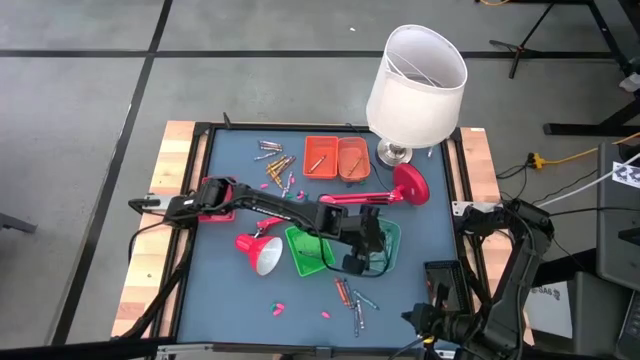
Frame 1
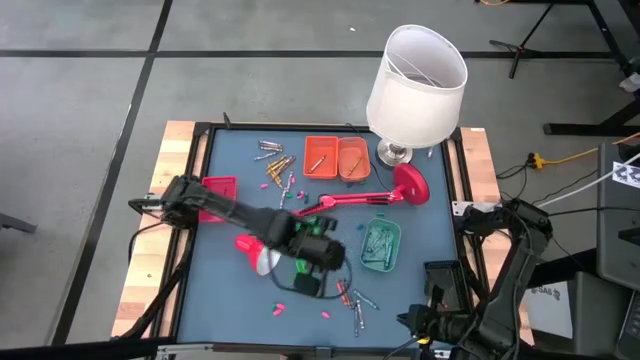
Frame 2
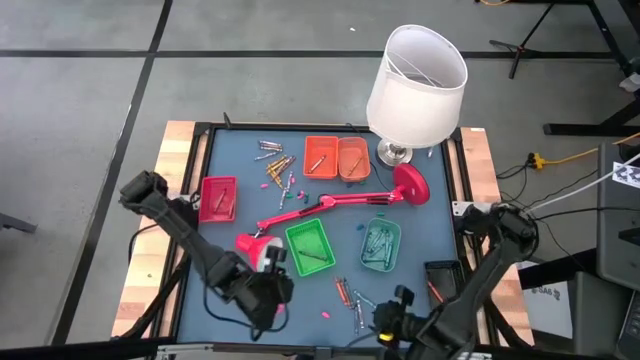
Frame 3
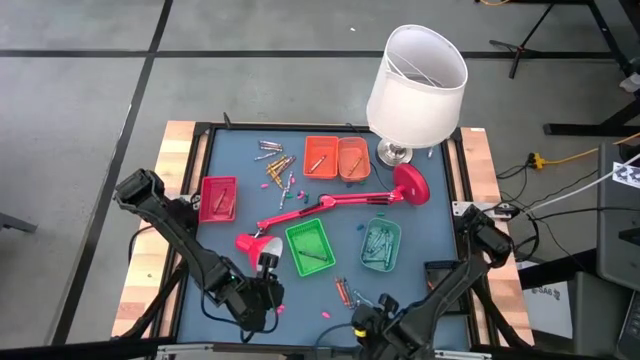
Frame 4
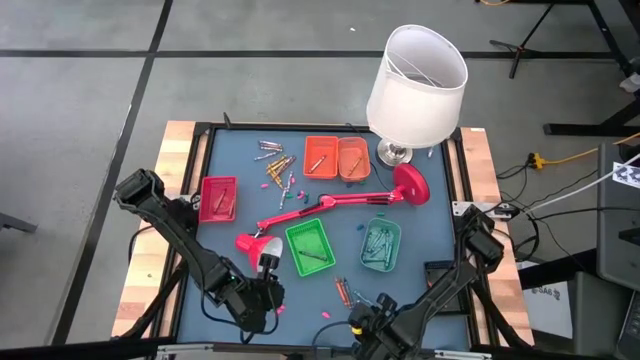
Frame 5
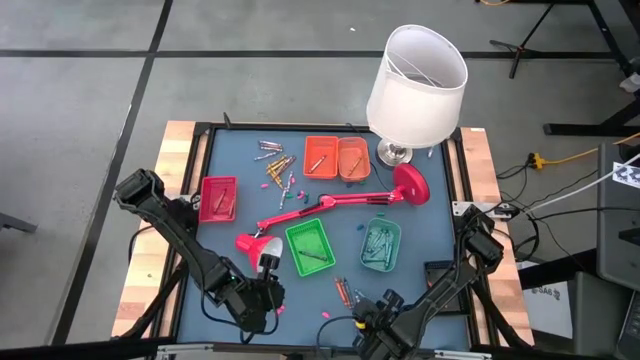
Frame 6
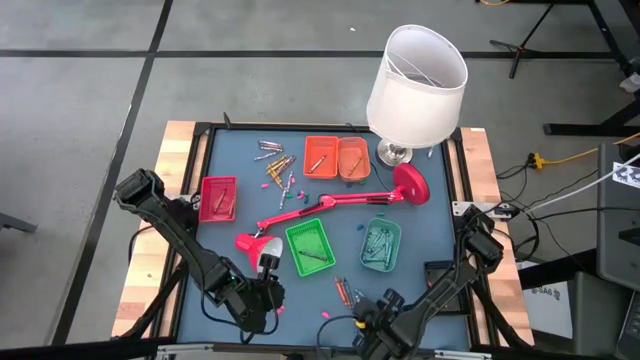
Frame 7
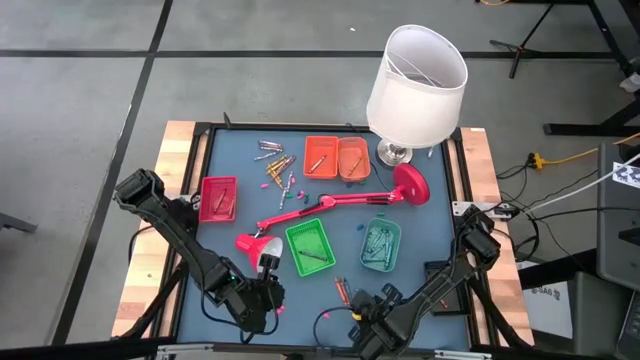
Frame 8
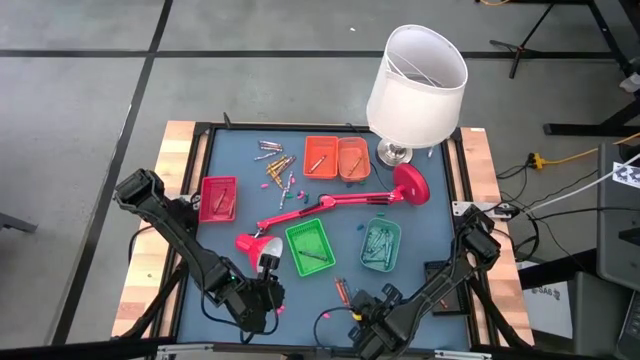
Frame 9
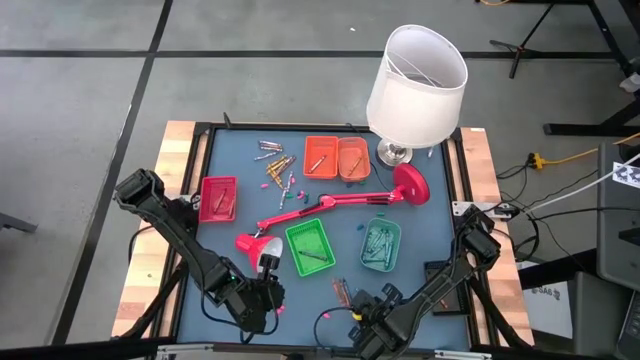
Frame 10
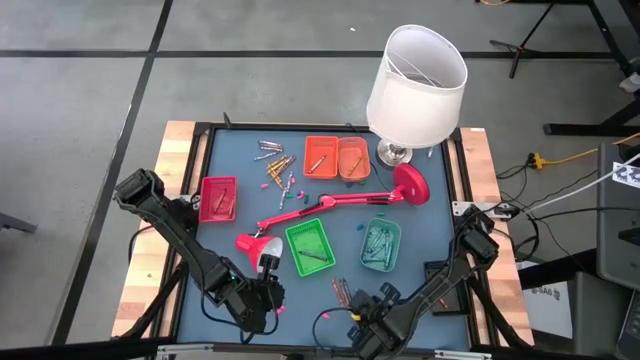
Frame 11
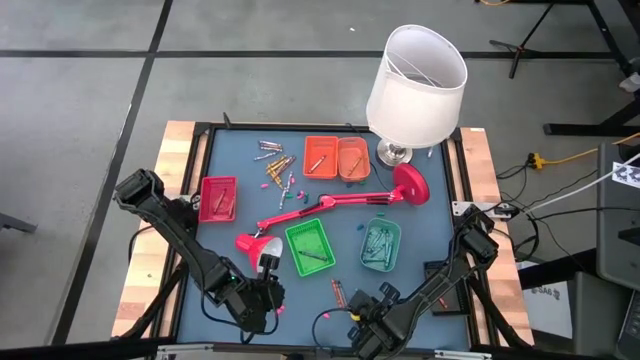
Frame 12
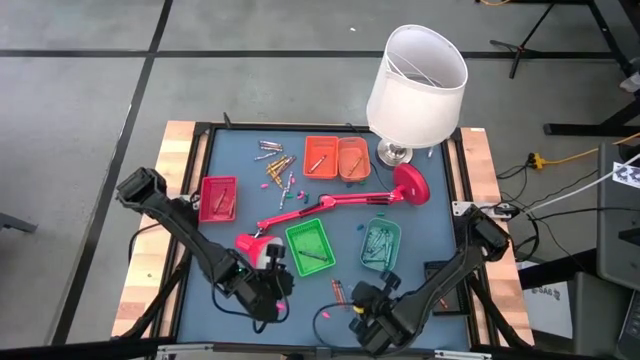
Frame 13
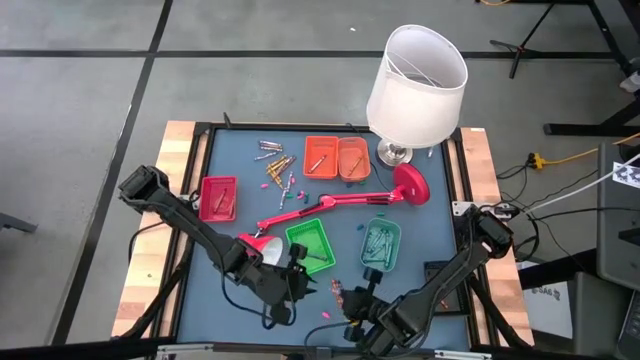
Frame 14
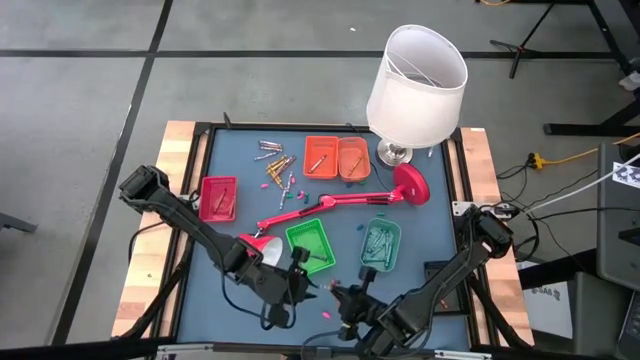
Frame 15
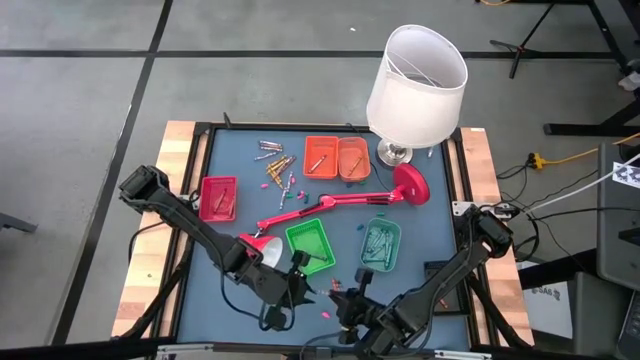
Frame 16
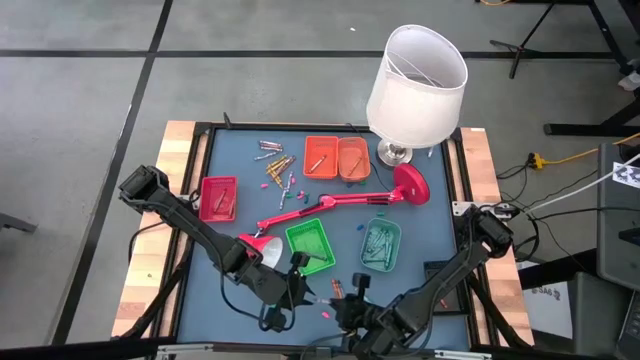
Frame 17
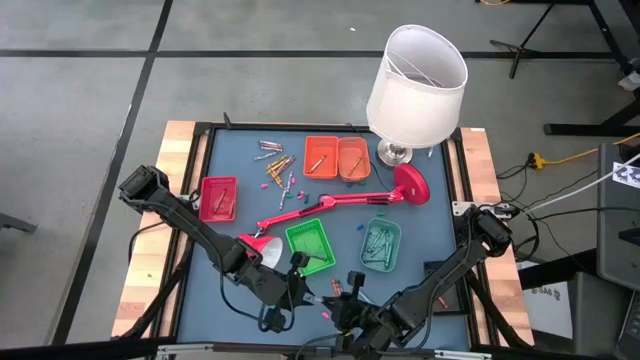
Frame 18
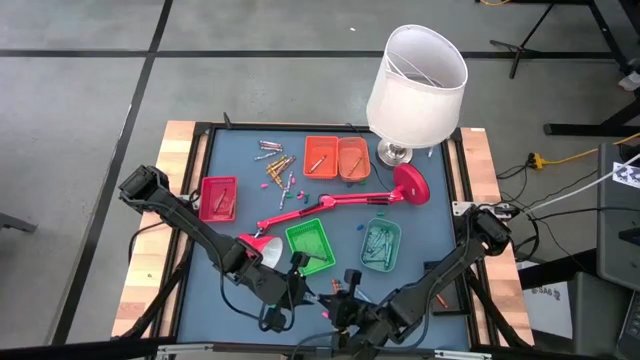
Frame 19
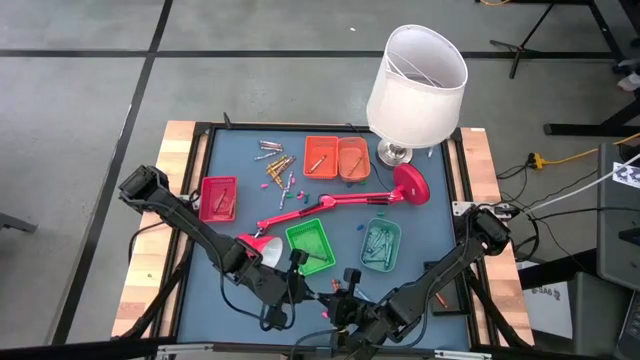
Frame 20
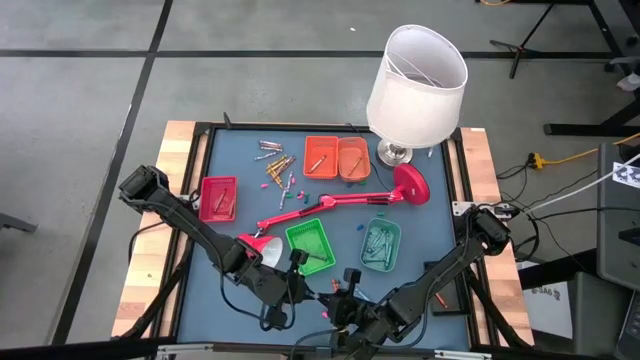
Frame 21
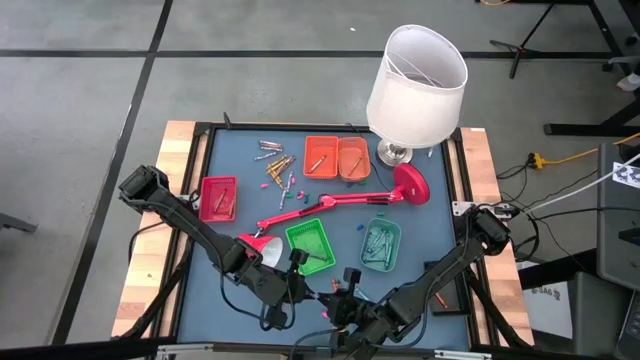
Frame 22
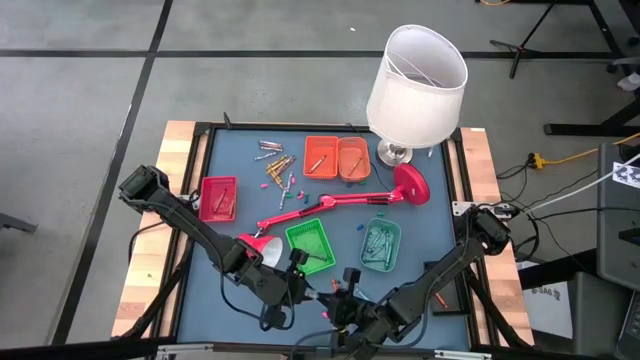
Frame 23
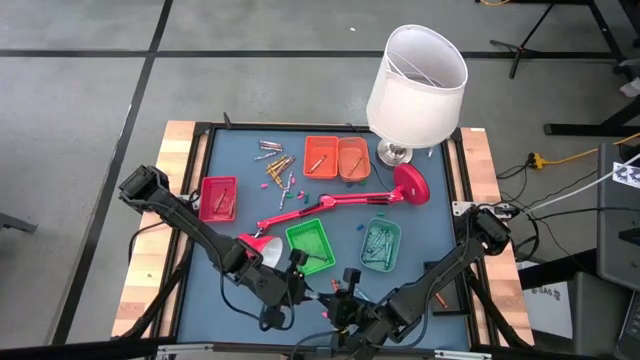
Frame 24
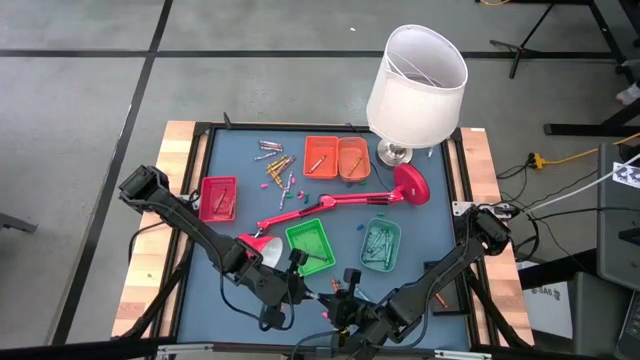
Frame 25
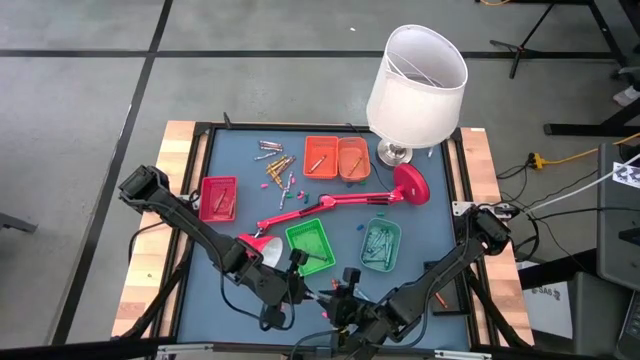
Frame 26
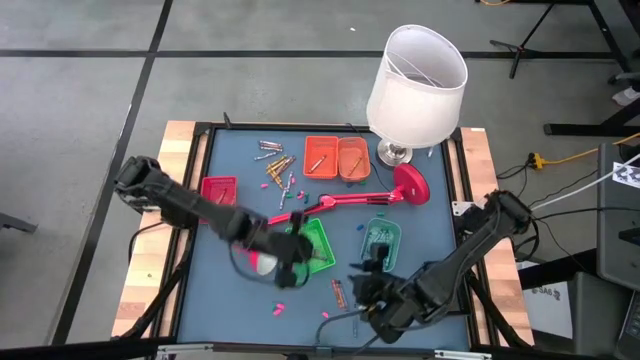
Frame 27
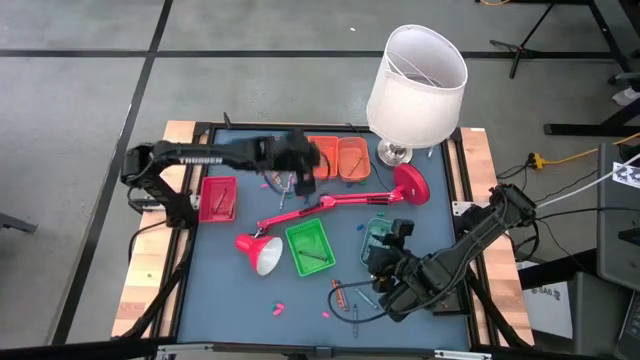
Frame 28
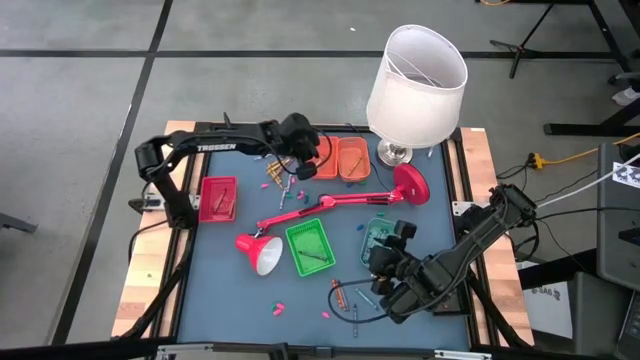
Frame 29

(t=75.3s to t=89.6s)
Task: Sort crayons
Put the gray crayon into the orange bin

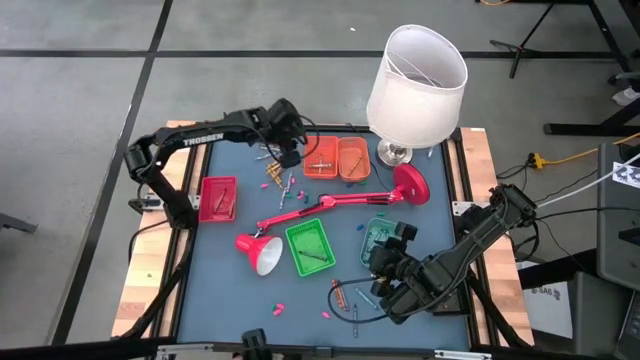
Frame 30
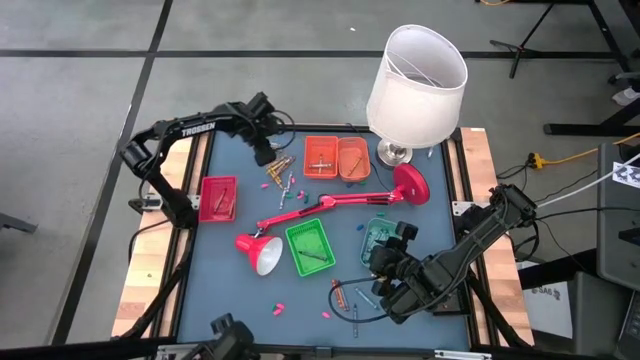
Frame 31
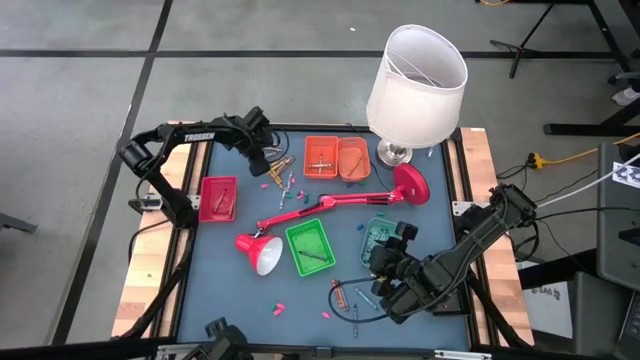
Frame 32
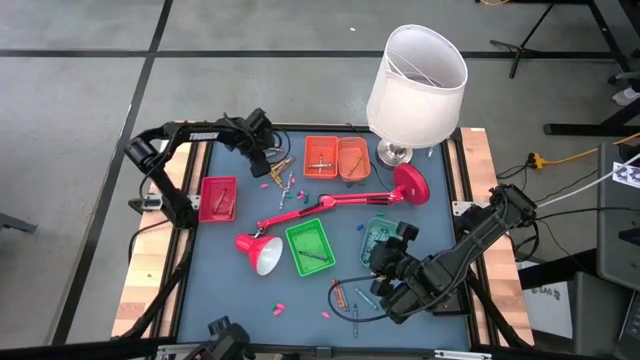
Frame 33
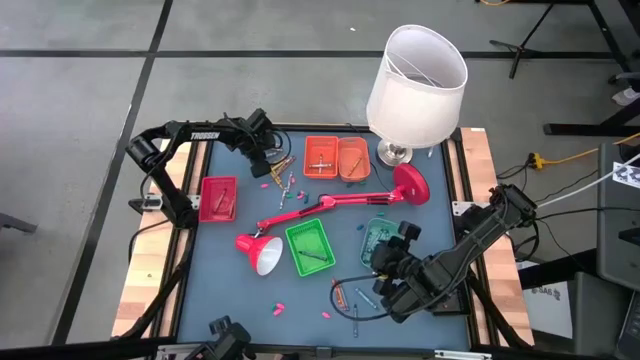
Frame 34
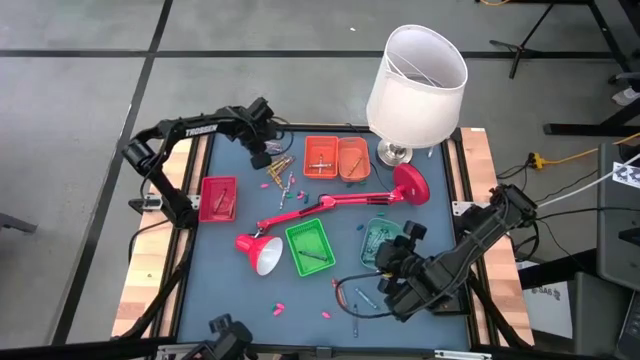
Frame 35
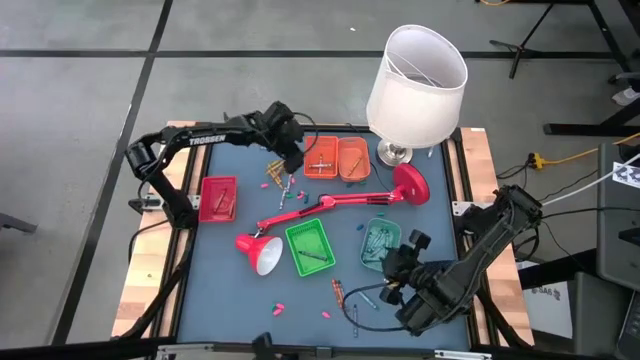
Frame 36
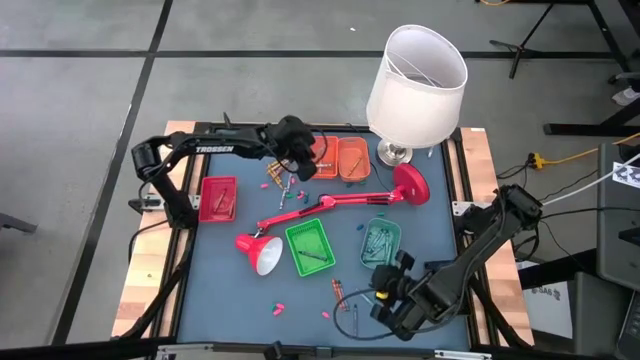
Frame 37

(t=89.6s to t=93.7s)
Put the gray crayon into the orange bin

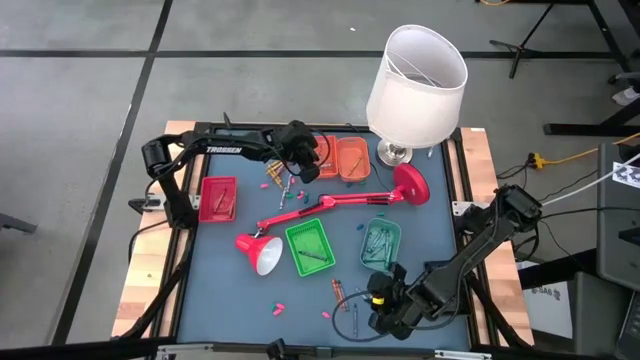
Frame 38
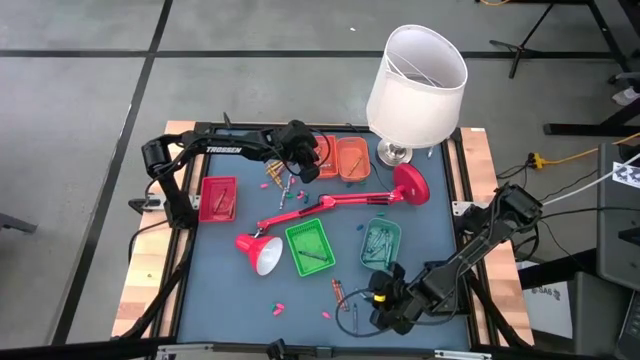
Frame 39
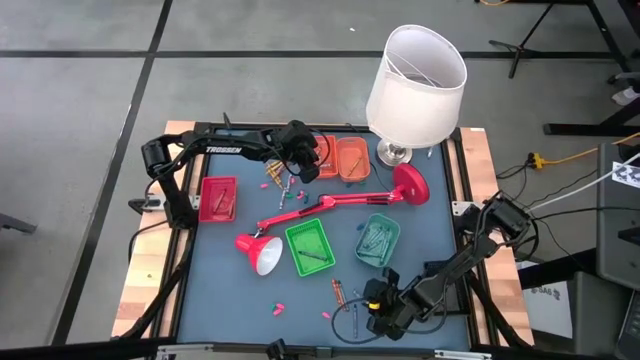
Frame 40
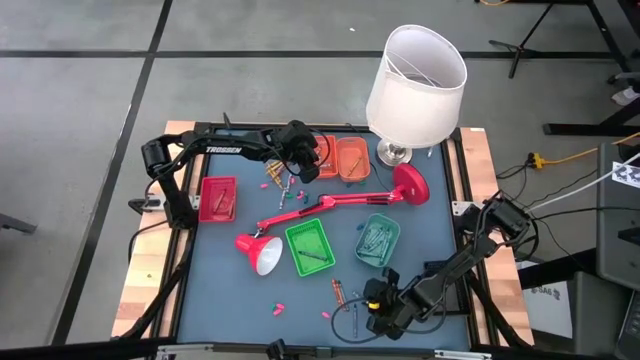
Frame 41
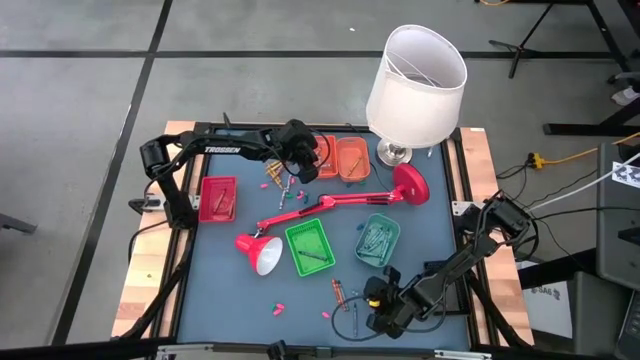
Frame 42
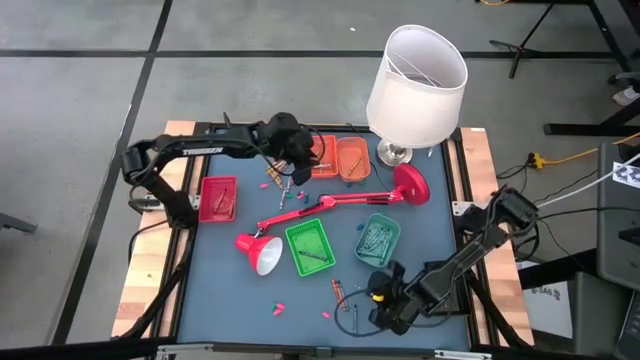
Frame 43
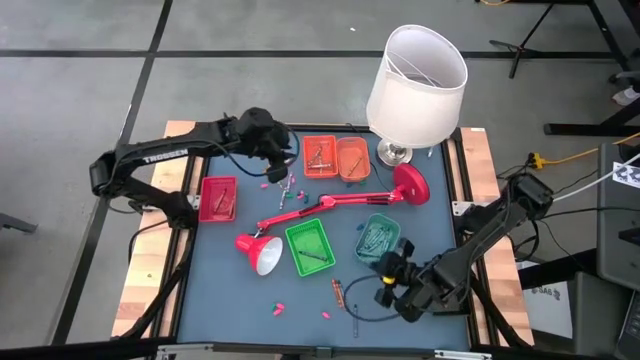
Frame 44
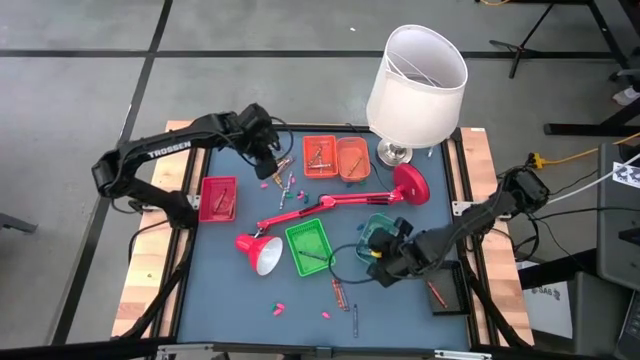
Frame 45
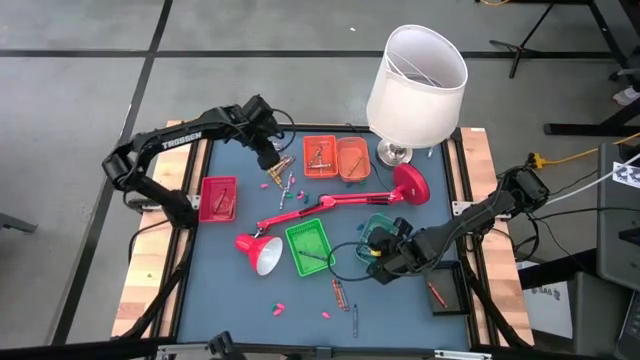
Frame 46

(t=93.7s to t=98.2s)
Put the green crayon into the light green bin
